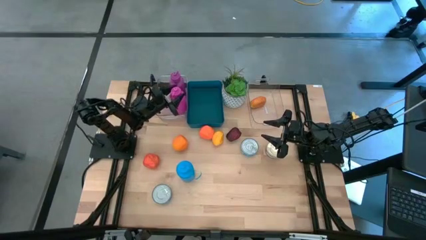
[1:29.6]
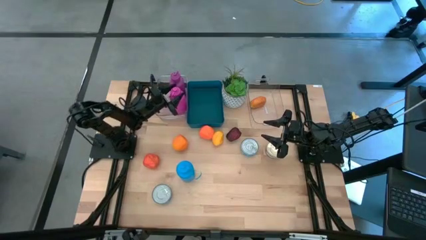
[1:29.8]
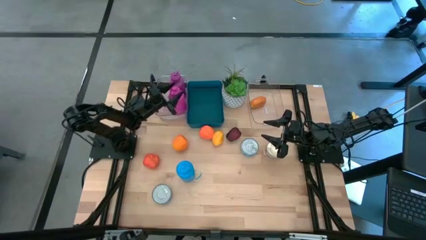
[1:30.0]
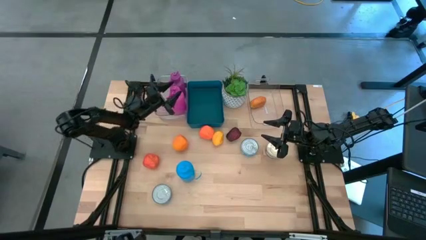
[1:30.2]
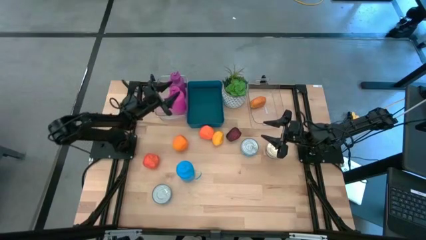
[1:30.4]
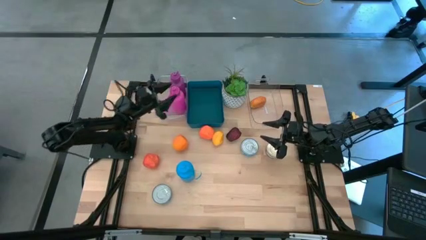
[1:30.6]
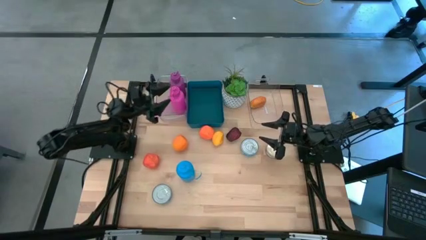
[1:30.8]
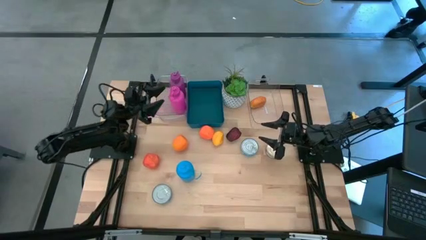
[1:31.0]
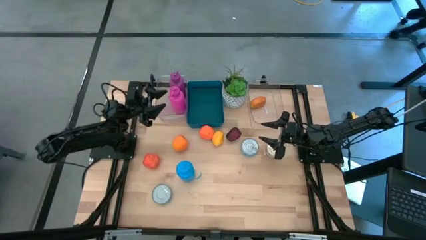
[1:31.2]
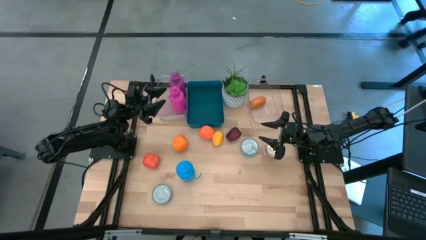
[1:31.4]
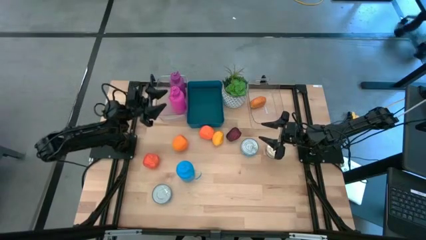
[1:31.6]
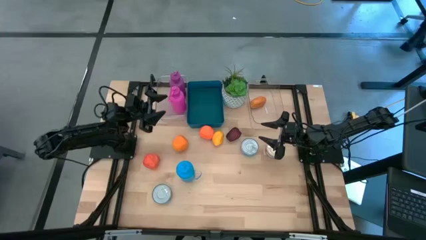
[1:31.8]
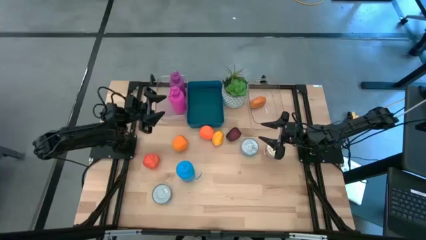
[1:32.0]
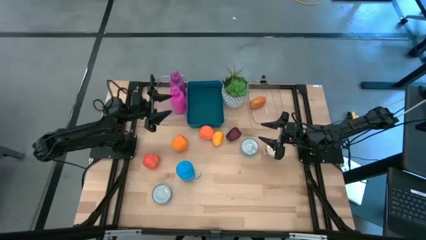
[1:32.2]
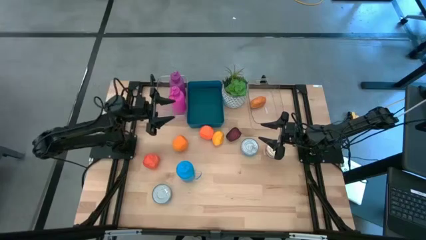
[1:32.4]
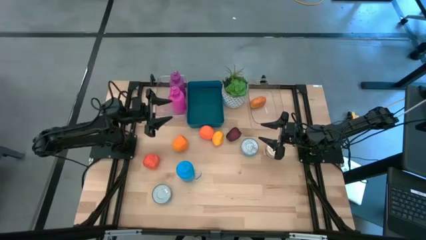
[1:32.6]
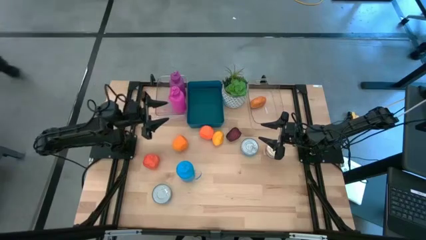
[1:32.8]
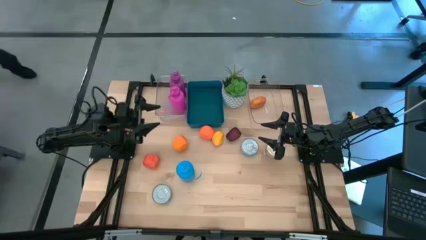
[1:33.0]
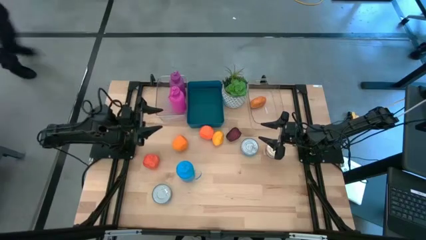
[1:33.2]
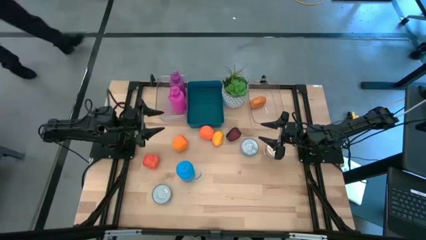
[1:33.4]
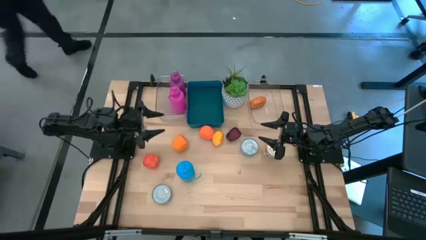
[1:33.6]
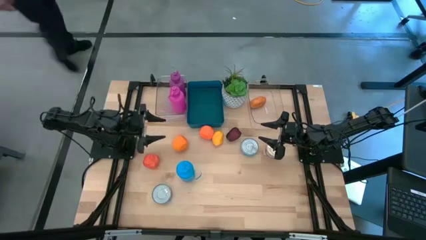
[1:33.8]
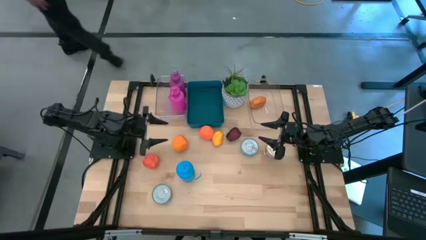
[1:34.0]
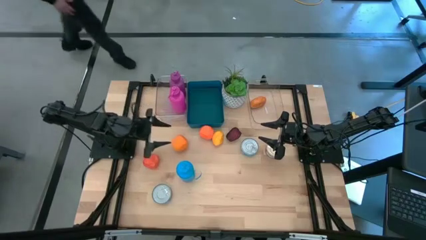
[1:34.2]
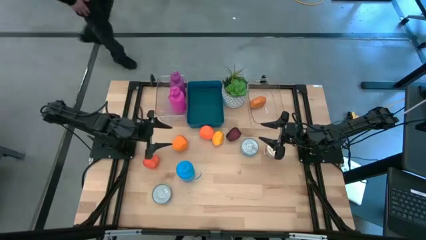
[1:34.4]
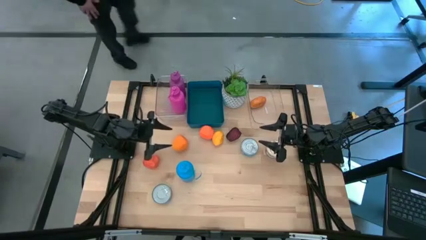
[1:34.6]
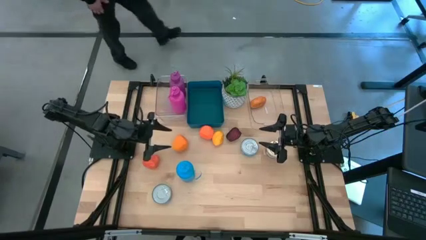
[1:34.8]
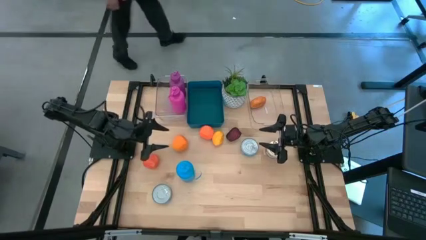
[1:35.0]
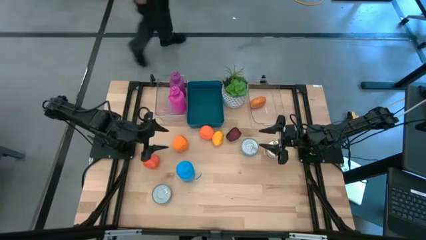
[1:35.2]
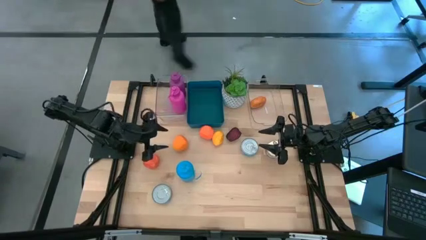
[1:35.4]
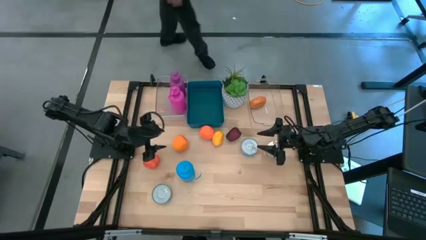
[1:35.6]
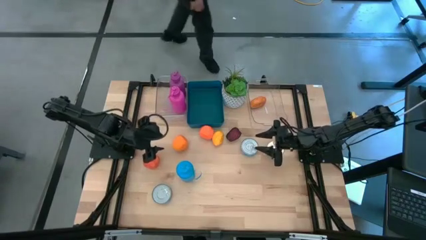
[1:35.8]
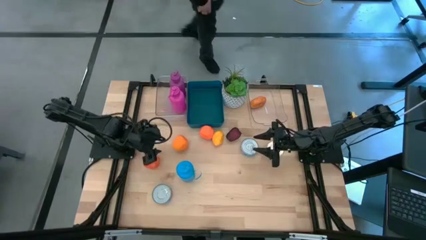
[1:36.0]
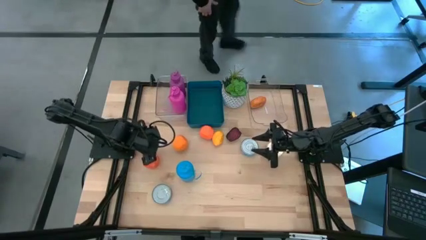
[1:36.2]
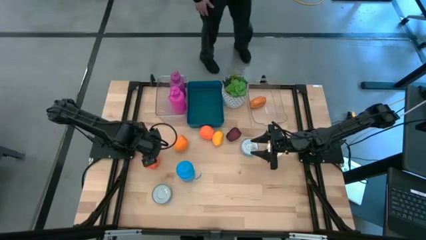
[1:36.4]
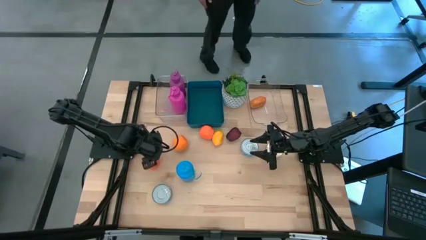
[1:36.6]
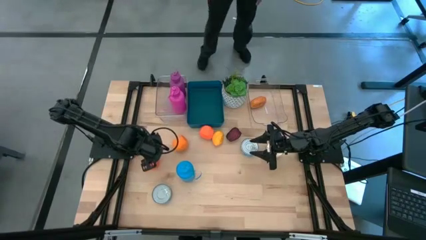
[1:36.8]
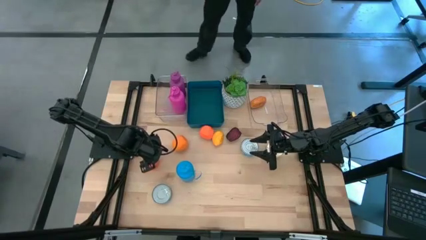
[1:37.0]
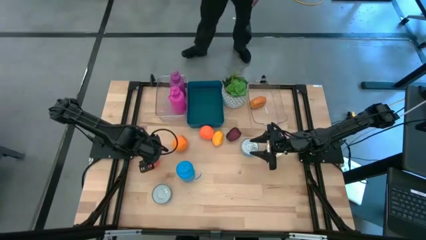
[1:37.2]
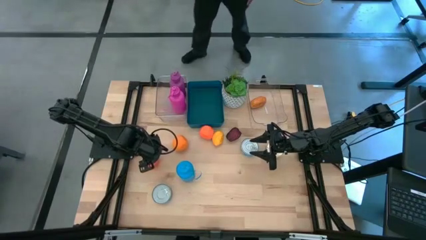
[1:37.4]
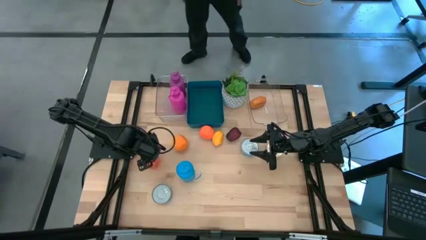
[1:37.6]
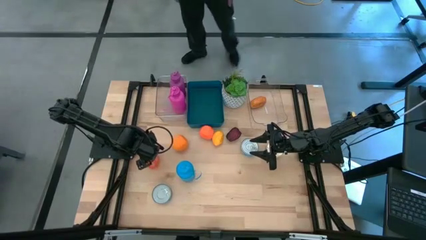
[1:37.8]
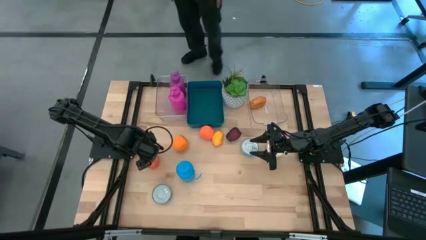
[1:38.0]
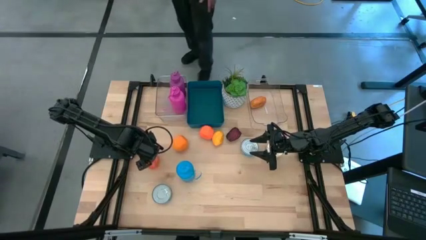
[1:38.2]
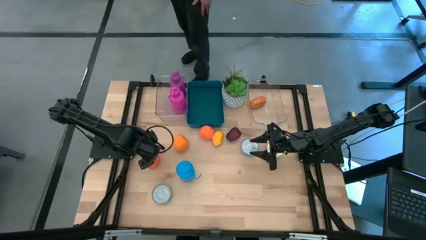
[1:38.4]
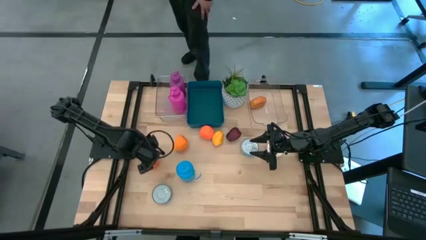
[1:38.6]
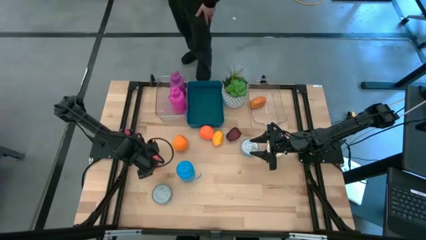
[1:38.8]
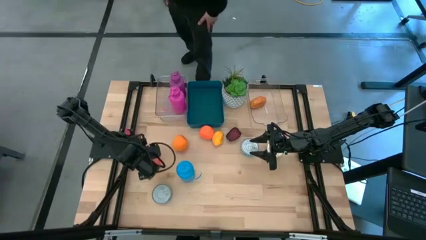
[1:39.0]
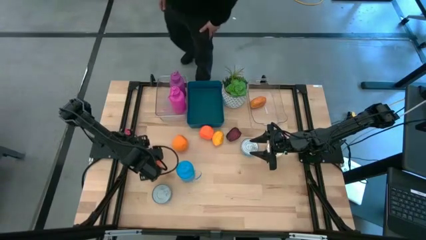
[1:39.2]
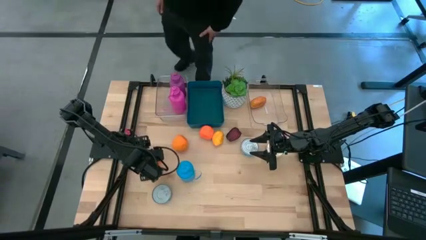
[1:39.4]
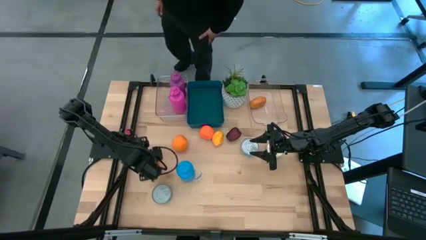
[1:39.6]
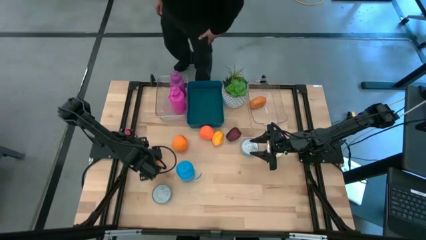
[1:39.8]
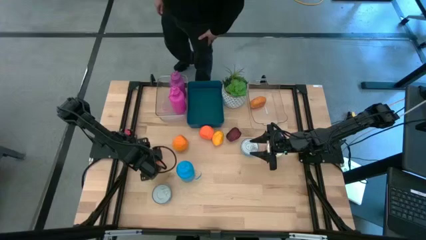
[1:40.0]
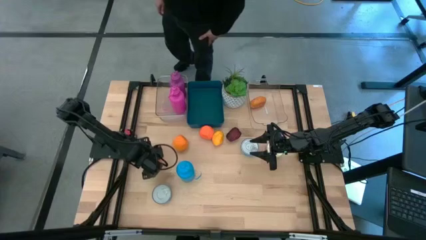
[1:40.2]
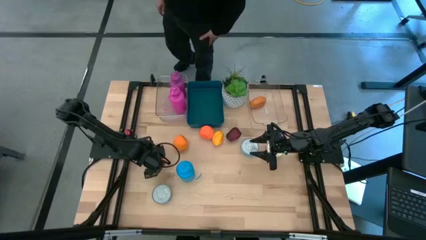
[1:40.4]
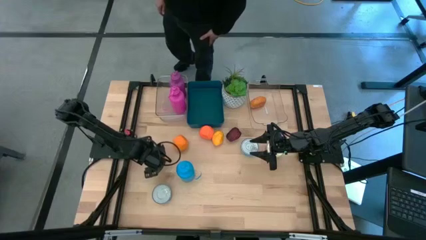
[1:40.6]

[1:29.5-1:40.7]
Task: Pick & Place Food Item
Put the left orange into the right transparent bin

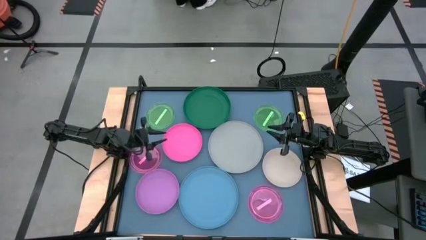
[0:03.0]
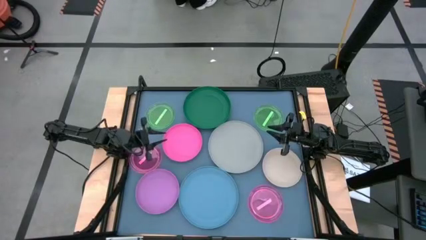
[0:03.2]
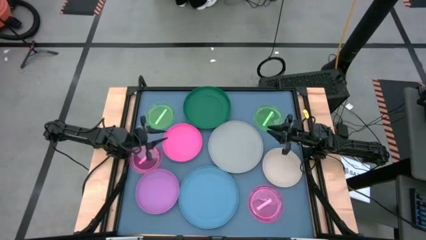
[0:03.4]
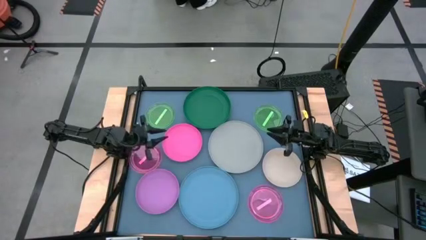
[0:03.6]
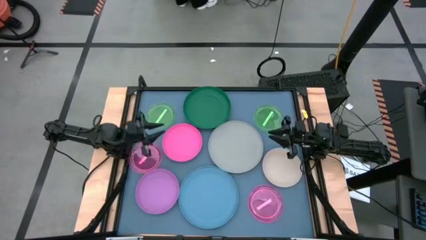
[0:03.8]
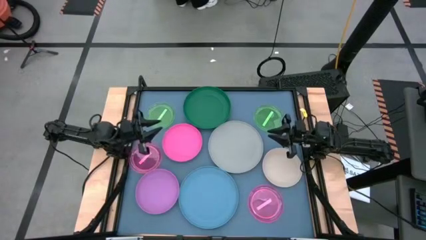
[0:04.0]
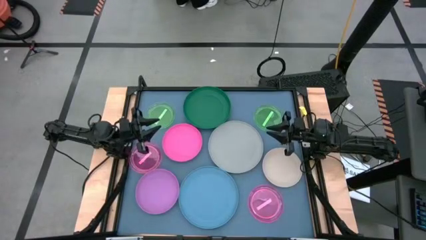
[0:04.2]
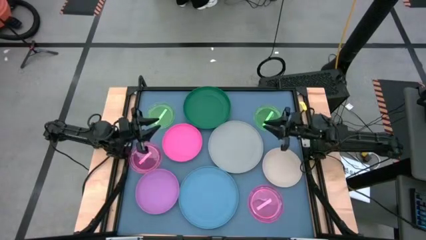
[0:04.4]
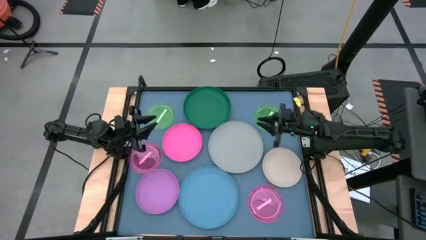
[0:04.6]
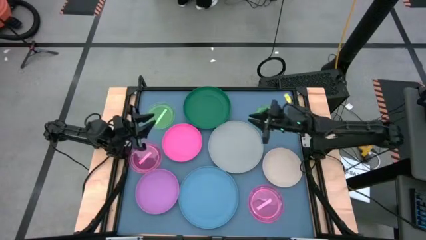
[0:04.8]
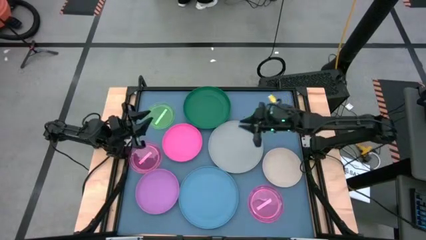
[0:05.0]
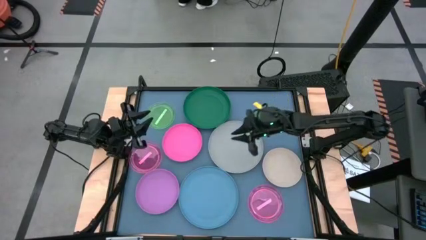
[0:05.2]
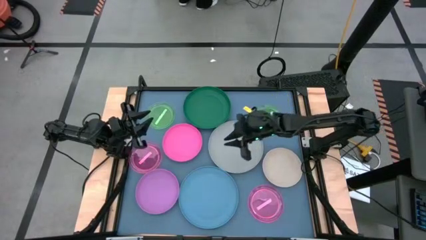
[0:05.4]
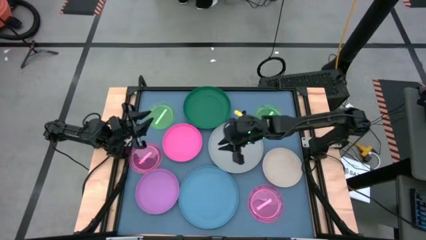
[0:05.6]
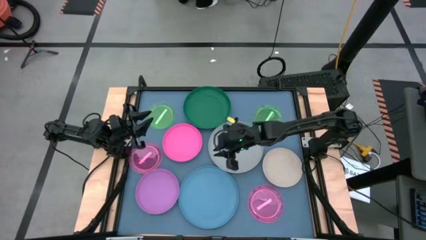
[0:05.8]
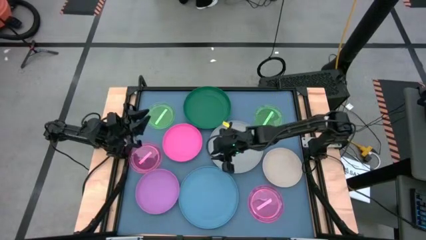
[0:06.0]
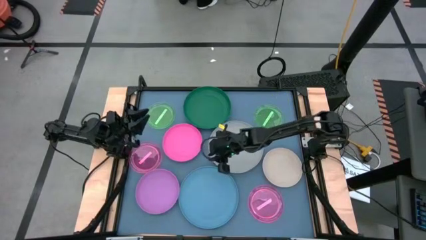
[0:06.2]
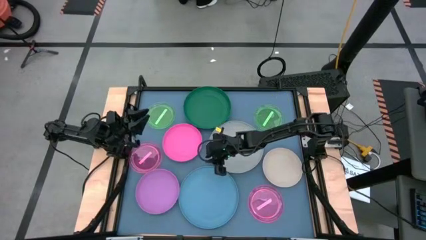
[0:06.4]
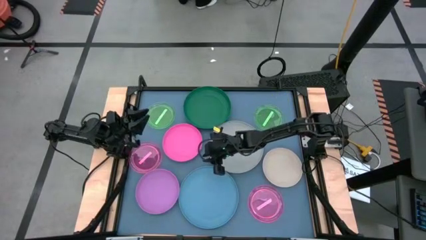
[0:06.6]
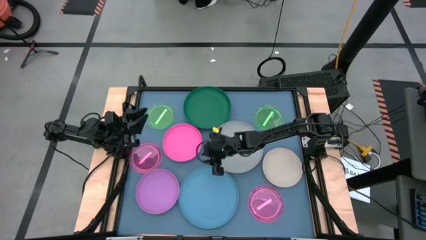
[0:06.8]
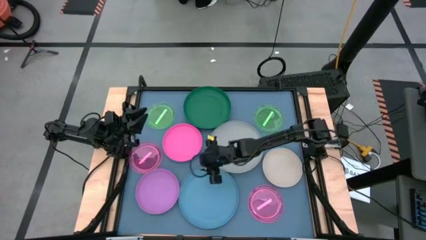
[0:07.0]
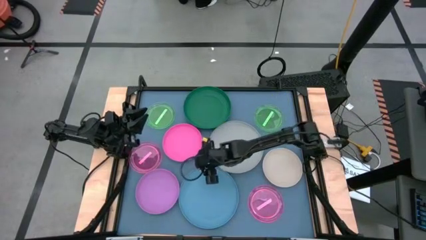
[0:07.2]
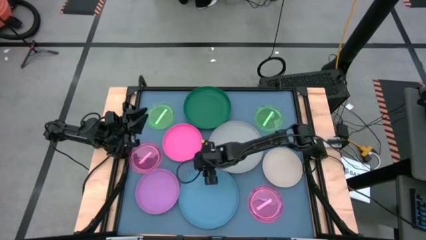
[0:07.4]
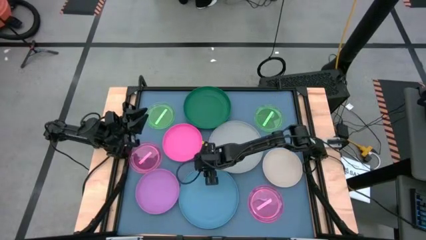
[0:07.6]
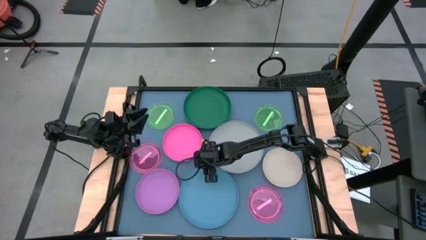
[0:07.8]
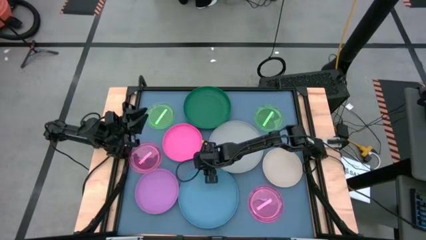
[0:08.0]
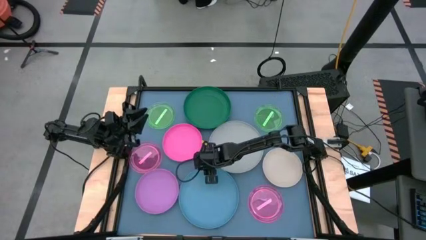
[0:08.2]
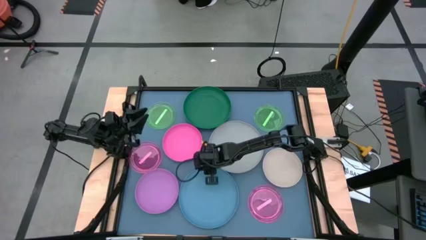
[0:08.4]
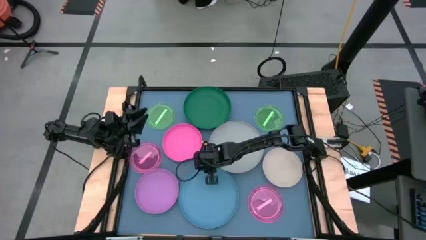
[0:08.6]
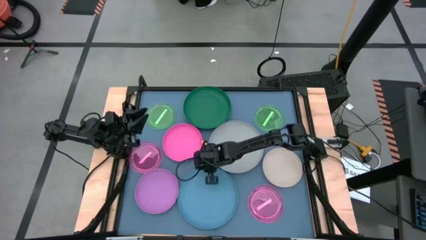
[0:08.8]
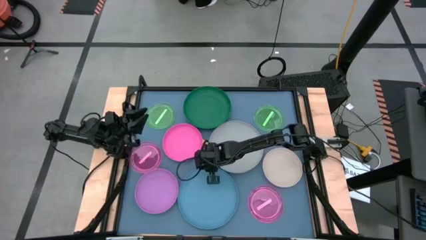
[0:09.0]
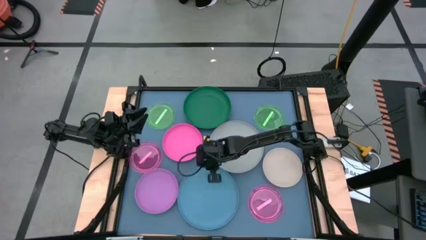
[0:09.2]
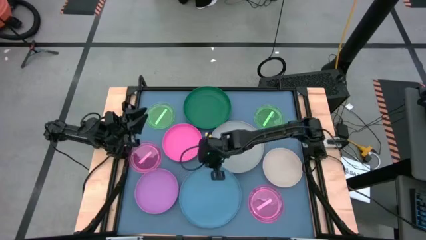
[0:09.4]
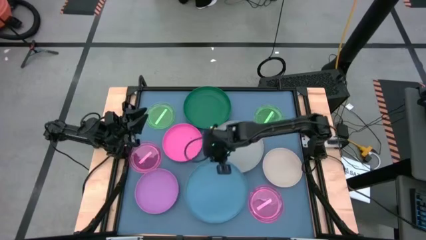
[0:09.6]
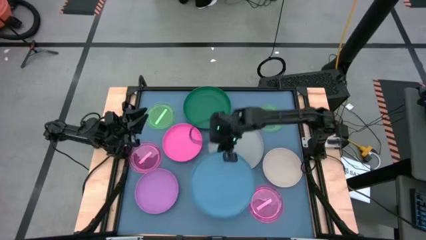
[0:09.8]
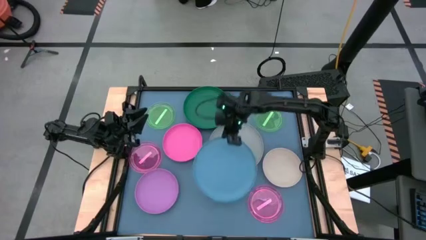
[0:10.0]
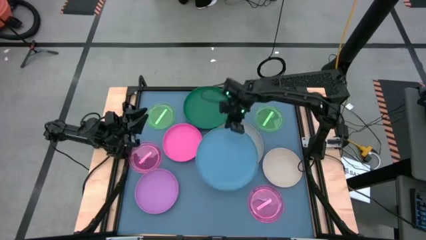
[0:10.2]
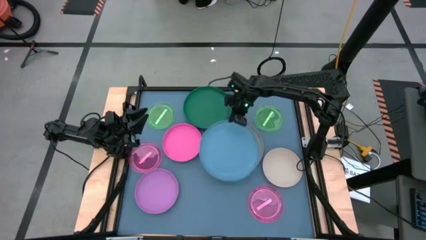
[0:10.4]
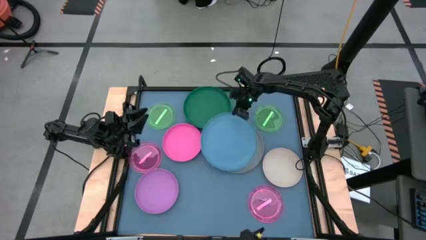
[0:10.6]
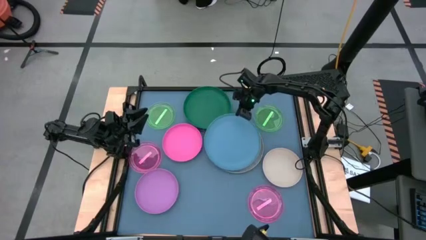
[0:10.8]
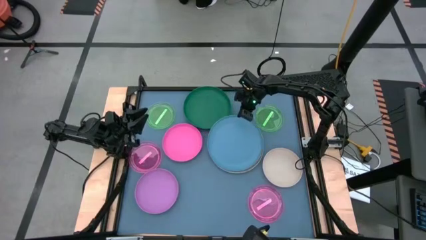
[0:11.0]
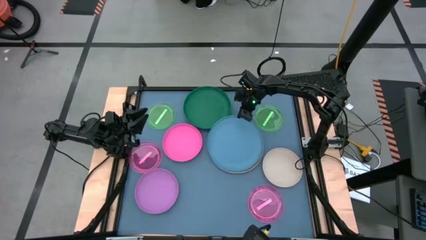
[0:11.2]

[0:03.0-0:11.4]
Task: Stack plastic plates
Stack the blue plate on top of the gray plate
